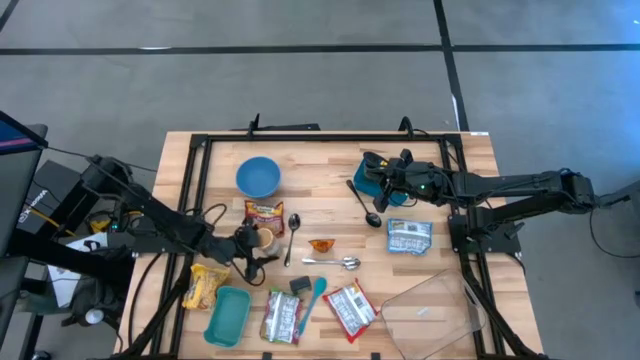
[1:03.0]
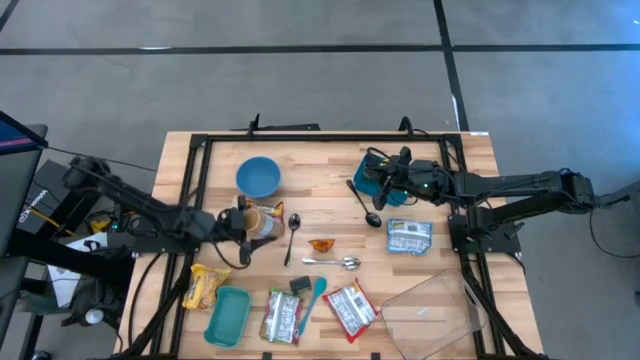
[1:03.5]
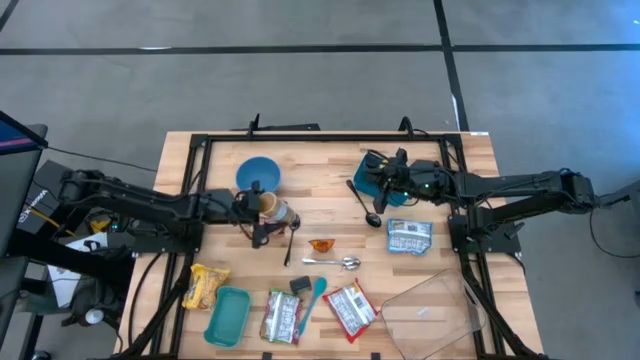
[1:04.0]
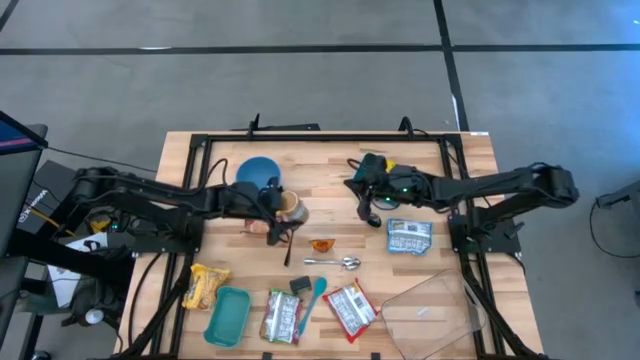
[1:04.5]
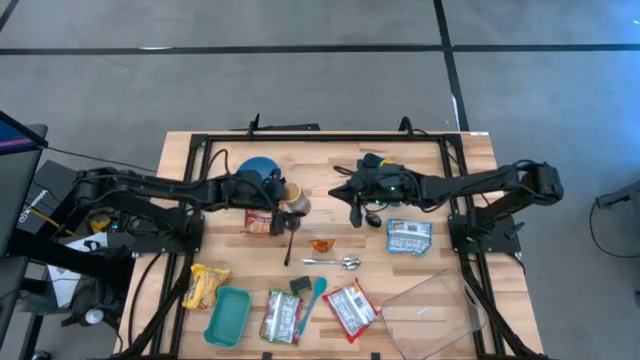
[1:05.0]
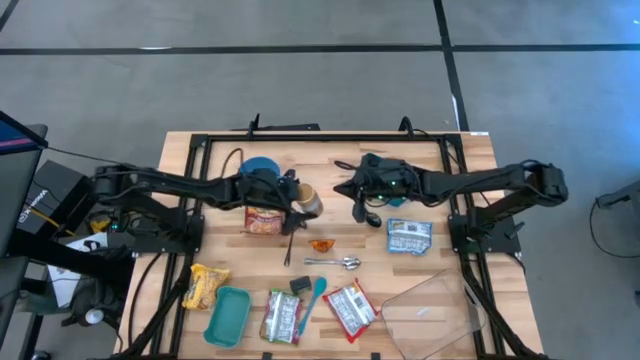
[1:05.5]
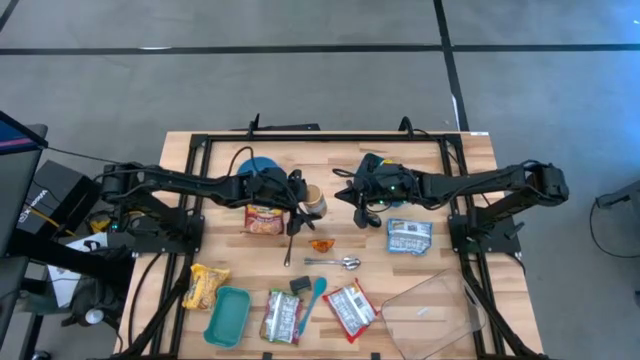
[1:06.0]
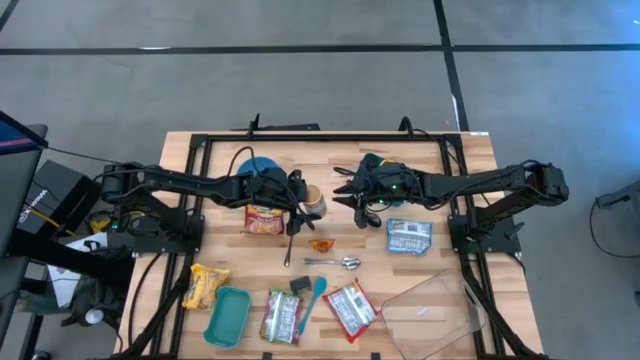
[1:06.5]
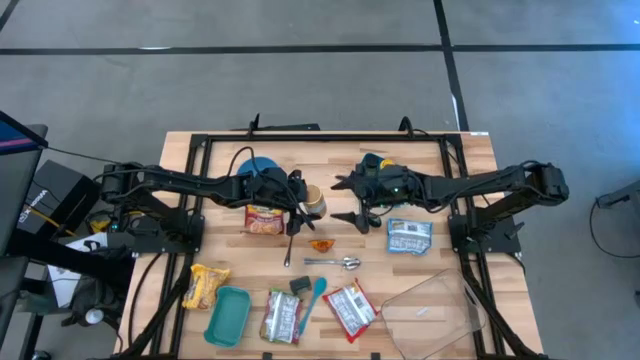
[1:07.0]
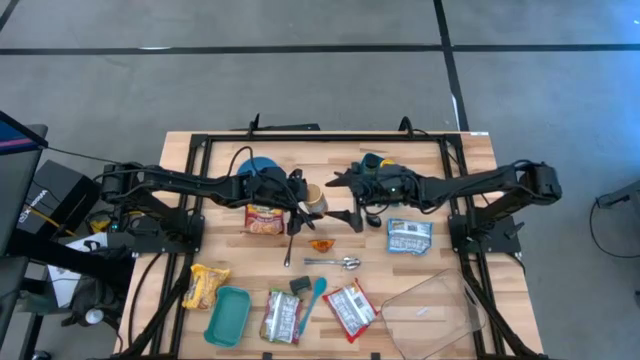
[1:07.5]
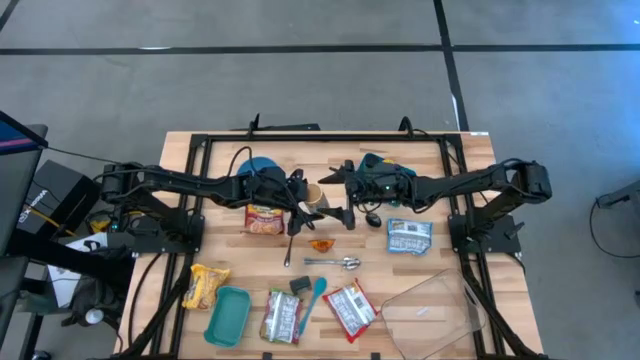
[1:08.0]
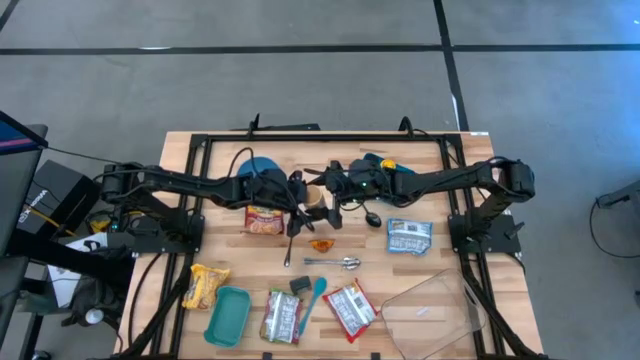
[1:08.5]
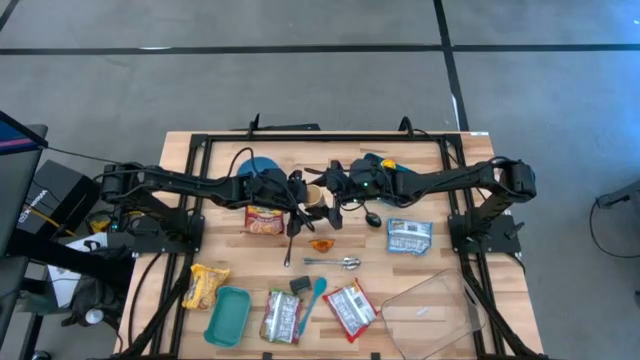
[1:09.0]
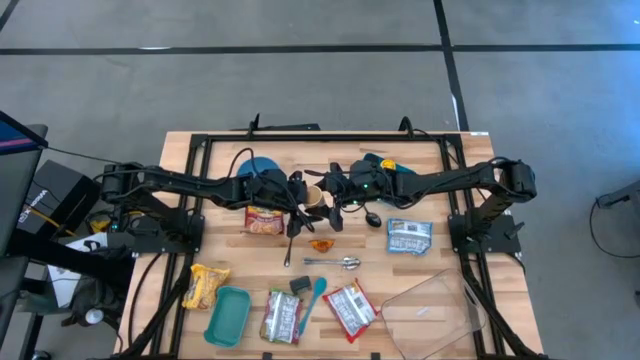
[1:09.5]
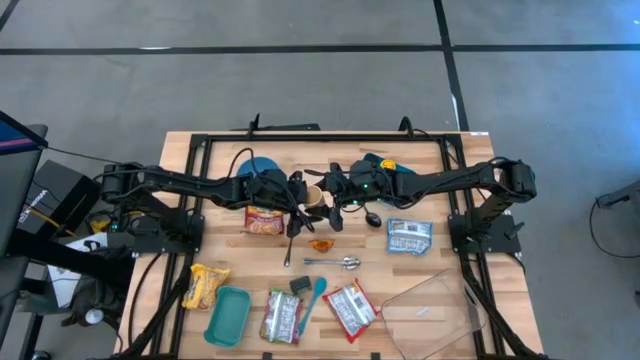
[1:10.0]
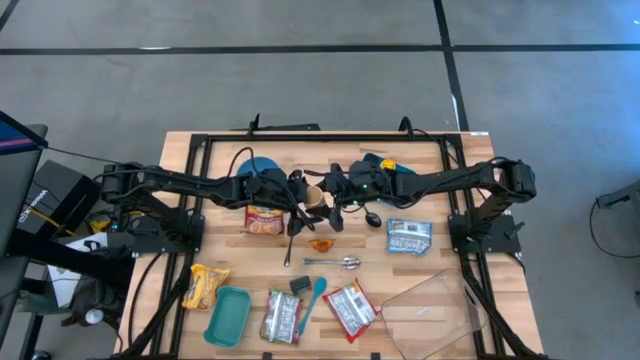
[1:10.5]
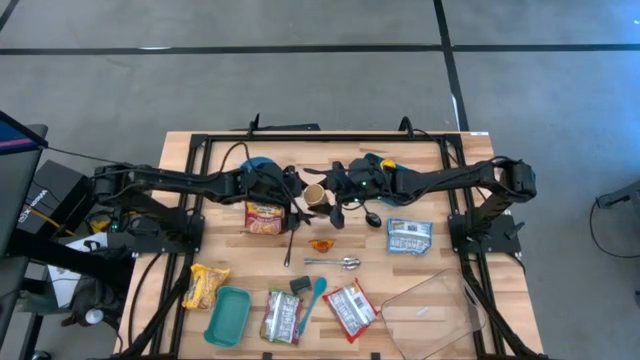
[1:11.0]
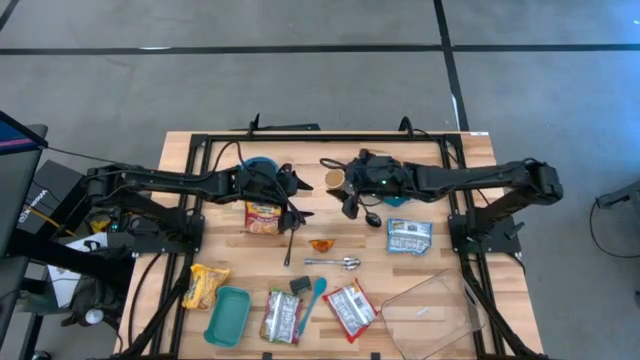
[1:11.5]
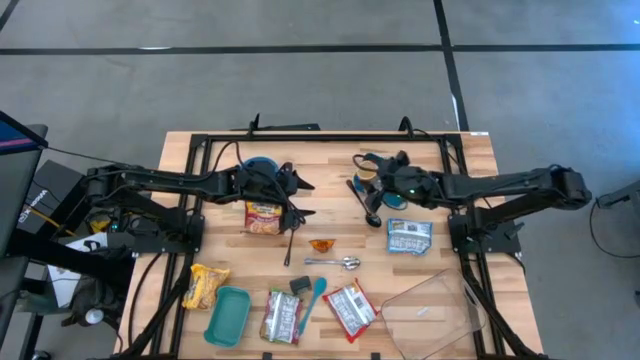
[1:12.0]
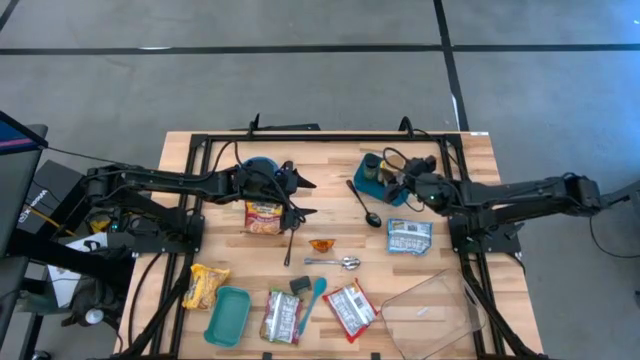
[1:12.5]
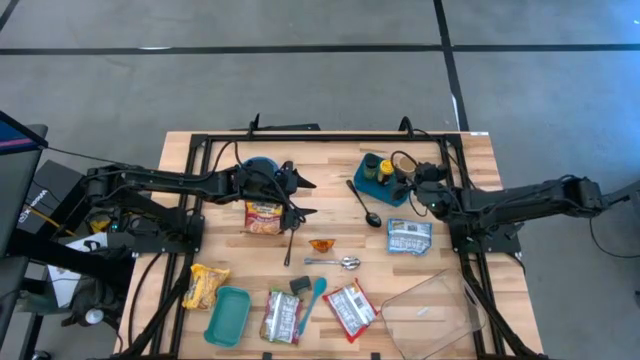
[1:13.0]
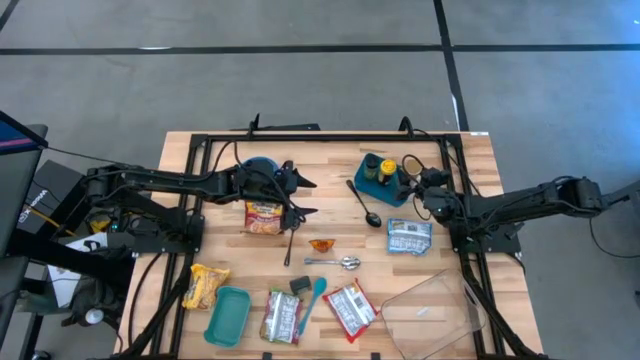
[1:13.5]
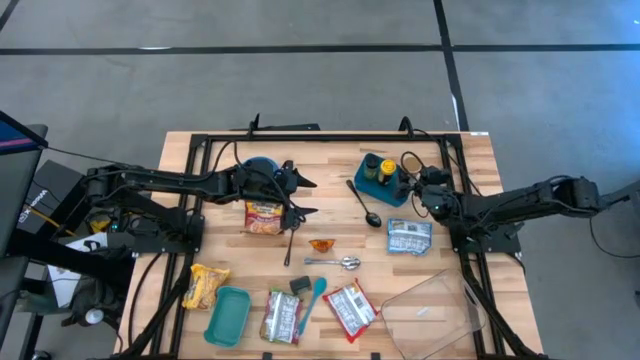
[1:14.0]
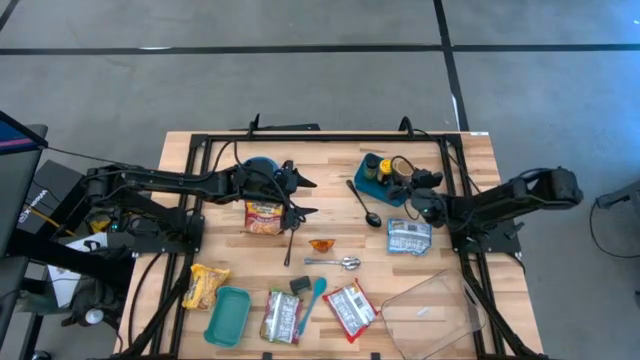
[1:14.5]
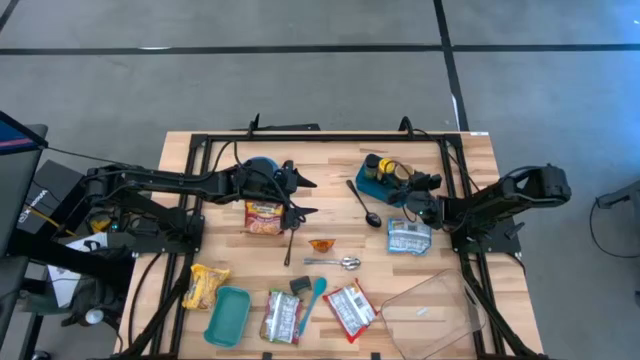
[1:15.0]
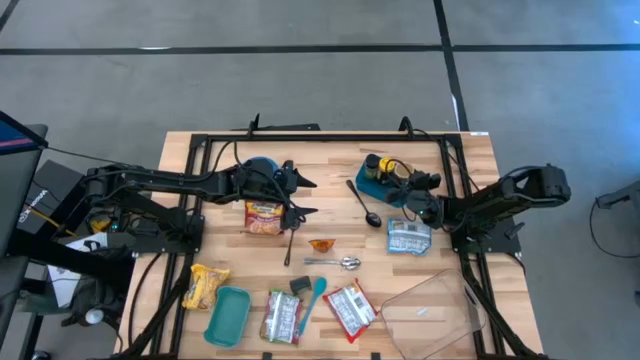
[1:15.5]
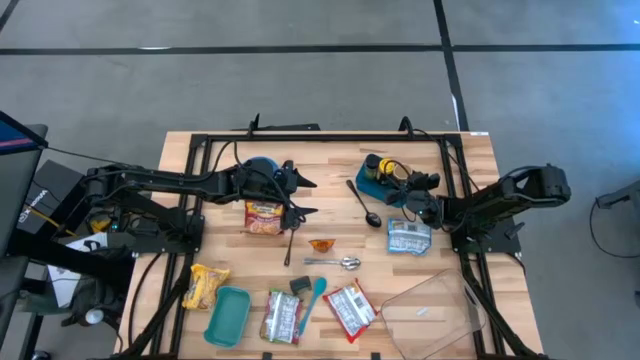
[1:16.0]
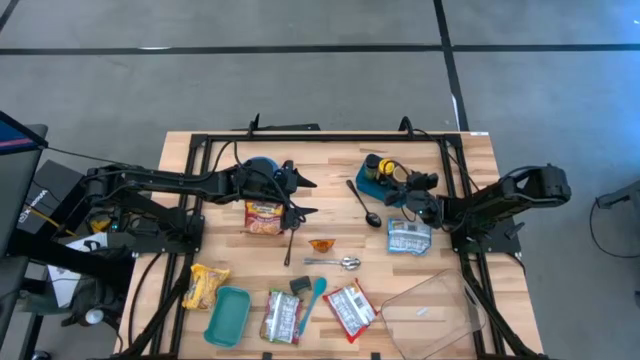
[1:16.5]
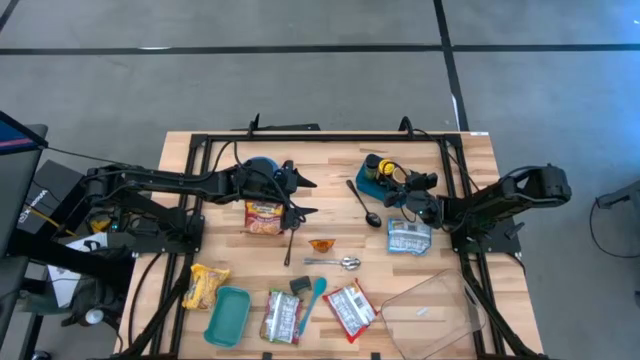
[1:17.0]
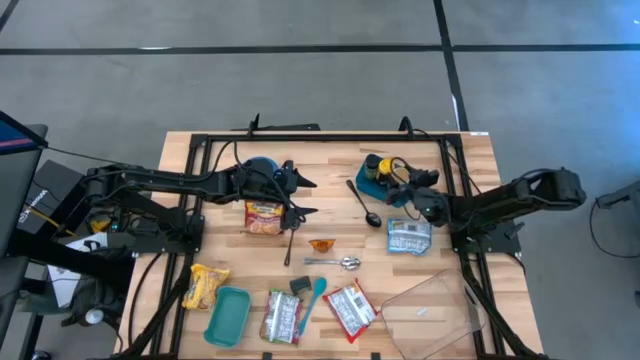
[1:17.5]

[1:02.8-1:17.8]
Task: Pick & Place Food Item
Put the golden seasoning bottle into the blue bin

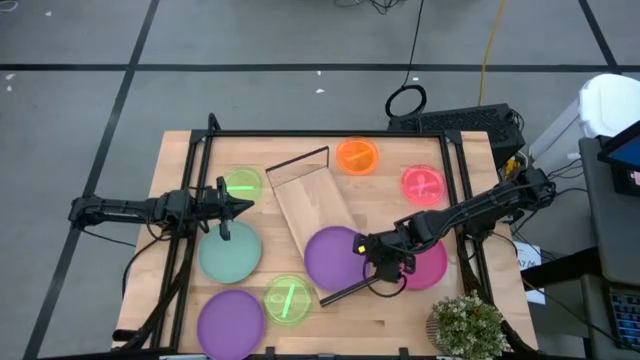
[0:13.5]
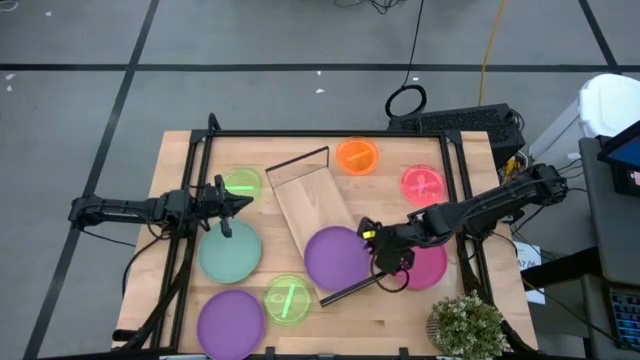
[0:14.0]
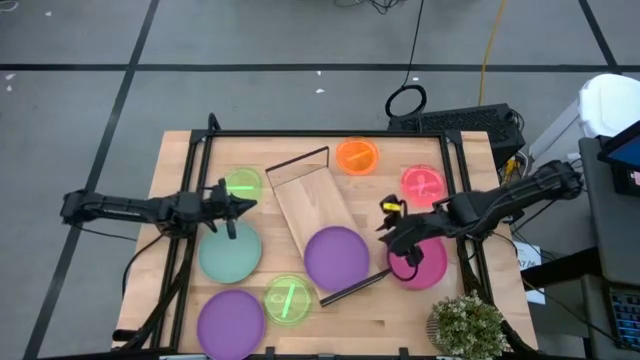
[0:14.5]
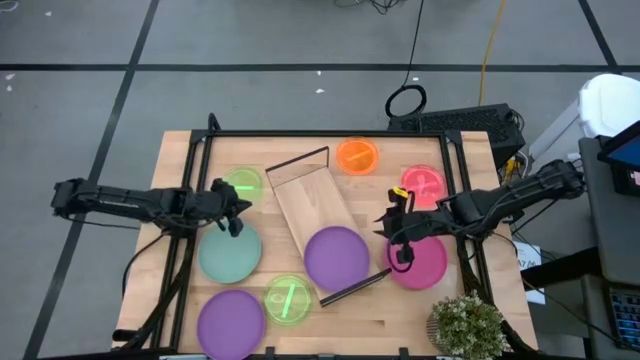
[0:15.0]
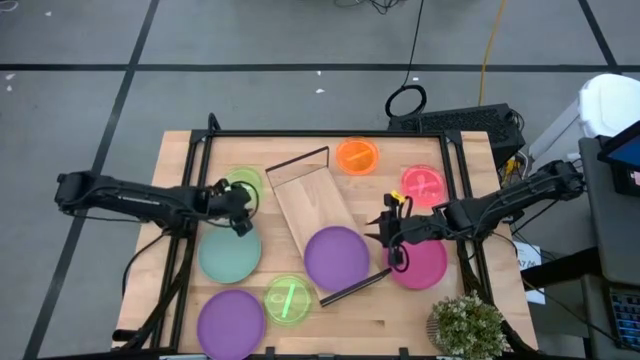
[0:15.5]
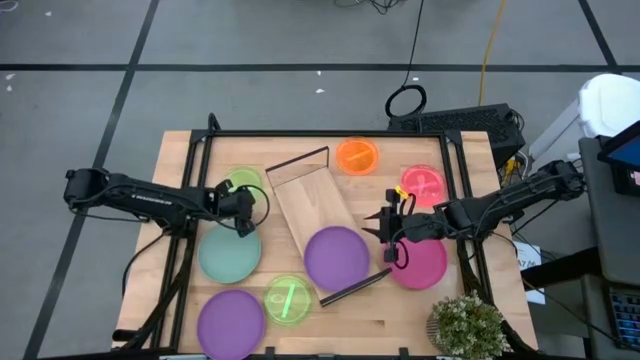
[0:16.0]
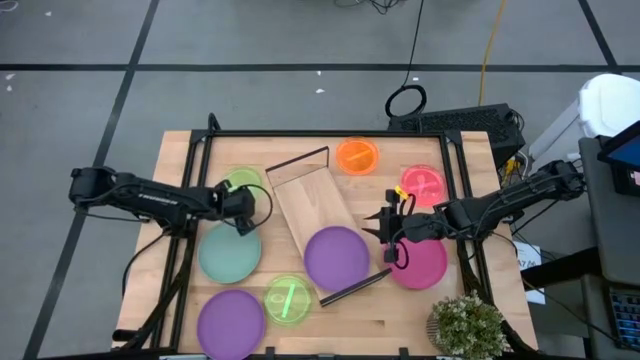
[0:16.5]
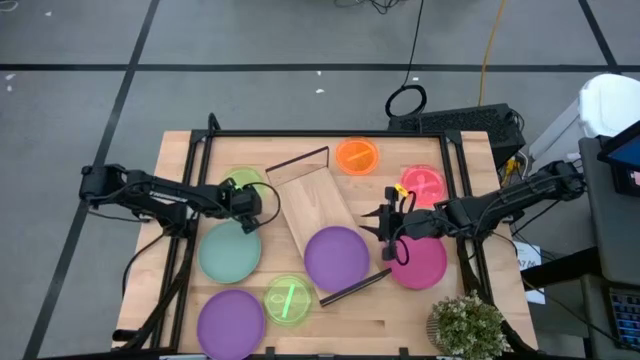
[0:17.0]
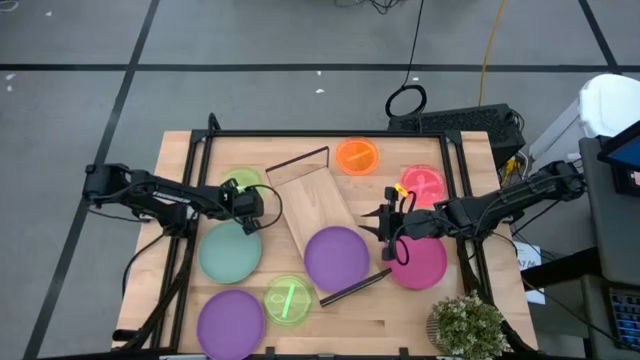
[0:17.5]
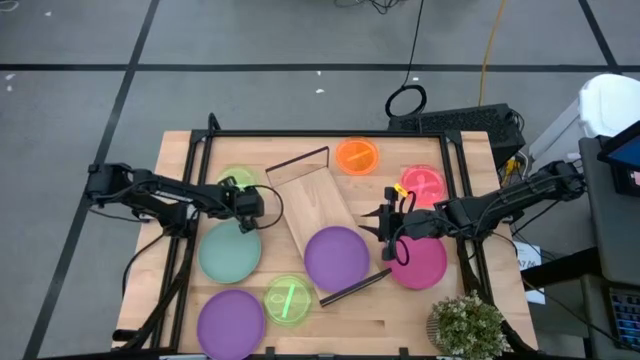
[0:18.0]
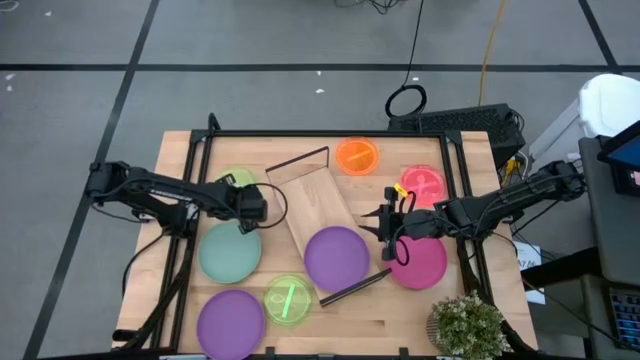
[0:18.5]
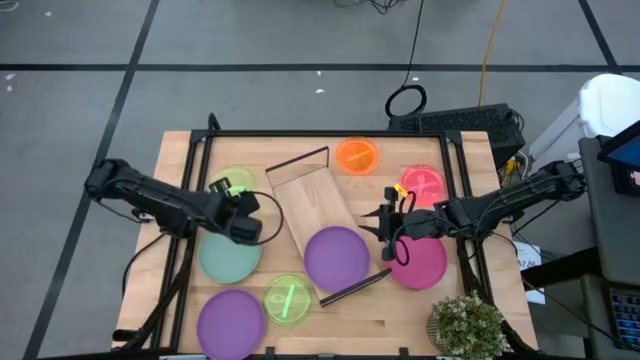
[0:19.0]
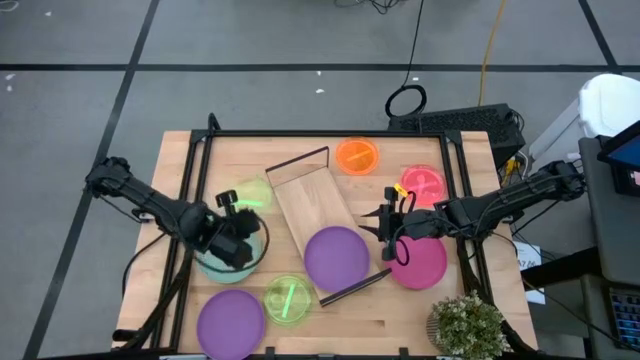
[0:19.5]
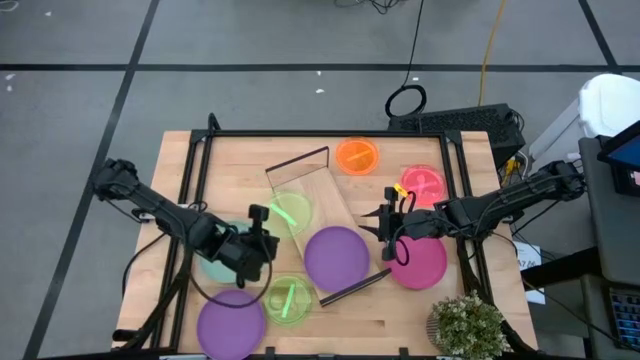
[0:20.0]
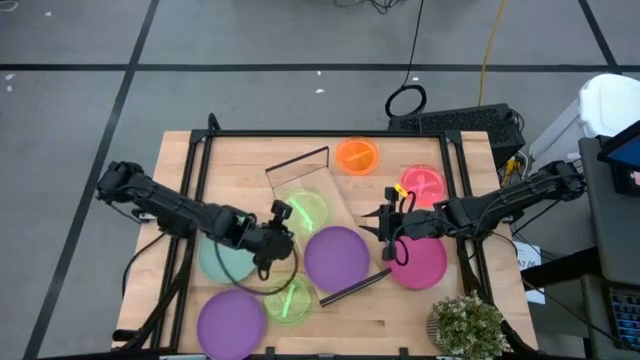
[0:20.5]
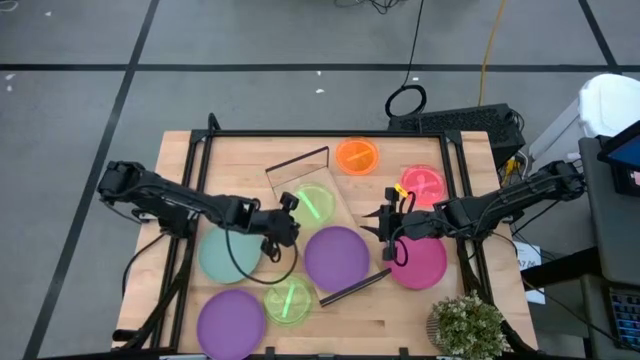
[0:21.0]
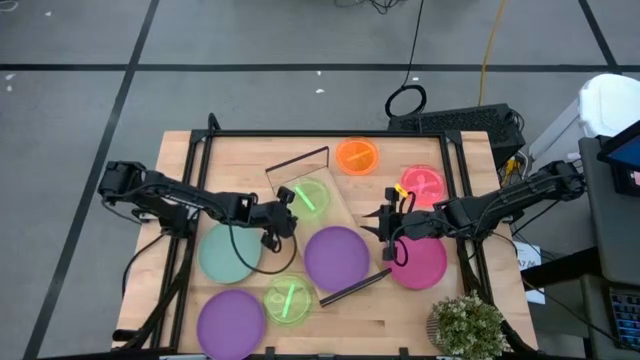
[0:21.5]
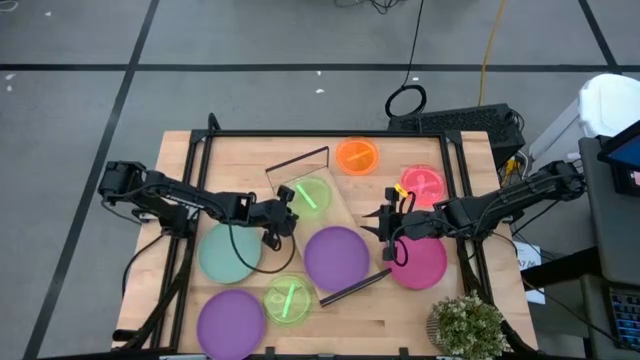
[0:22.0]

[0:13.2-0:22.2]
Task: Place and stack plates onto a shelf
Put the top yellow green plate on the shelf
